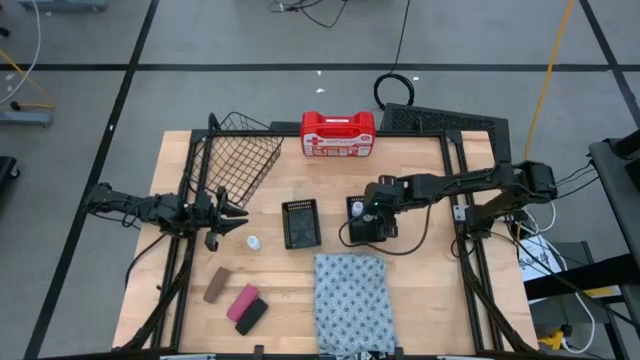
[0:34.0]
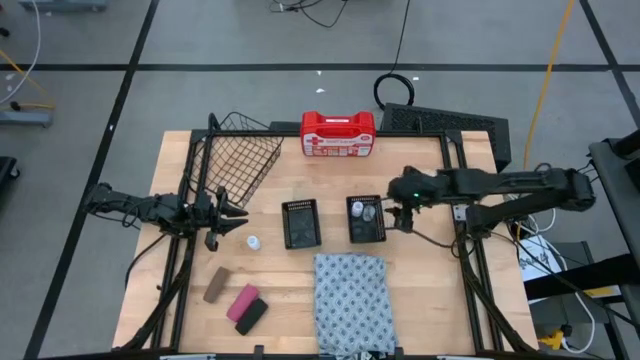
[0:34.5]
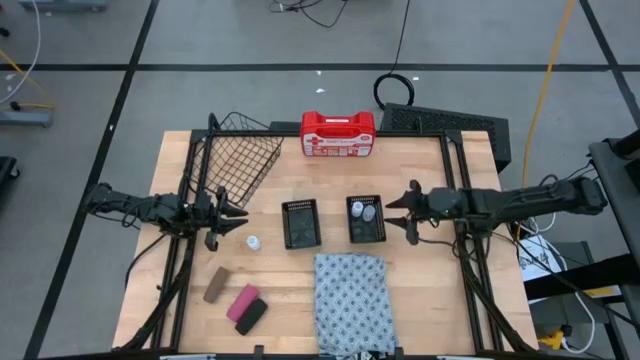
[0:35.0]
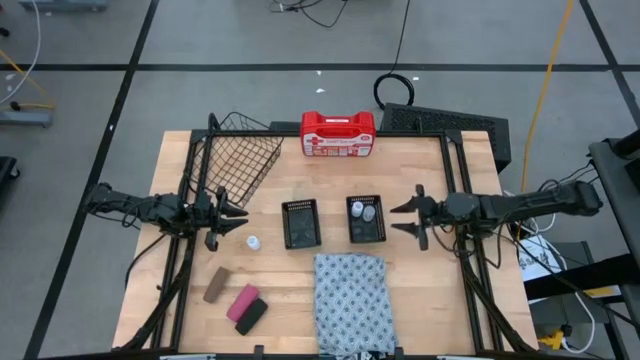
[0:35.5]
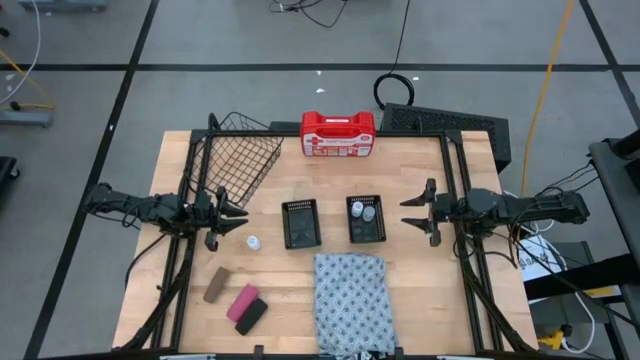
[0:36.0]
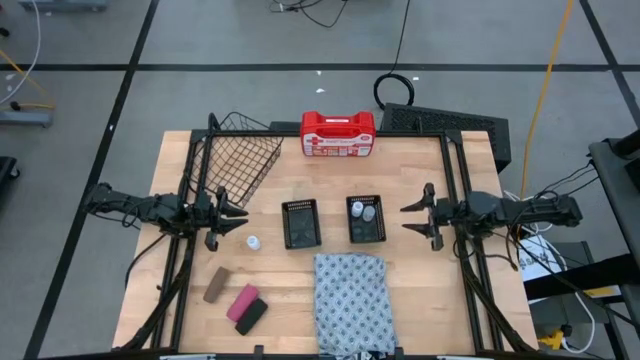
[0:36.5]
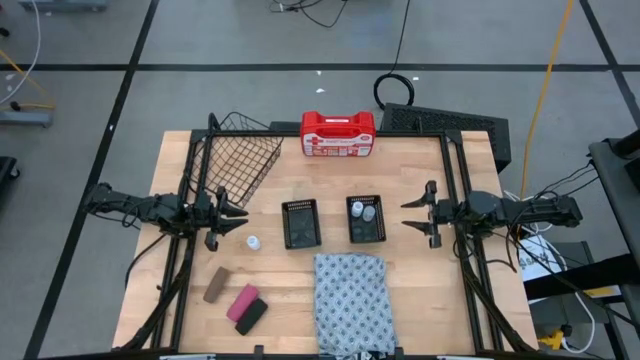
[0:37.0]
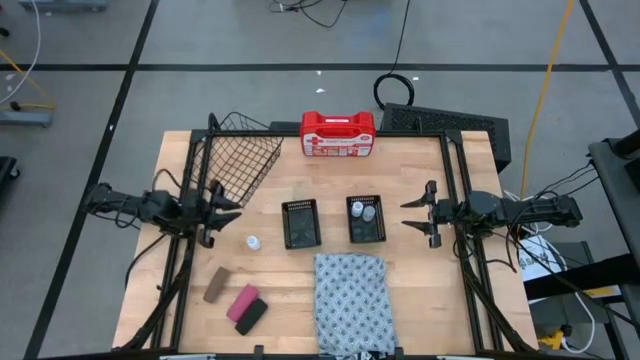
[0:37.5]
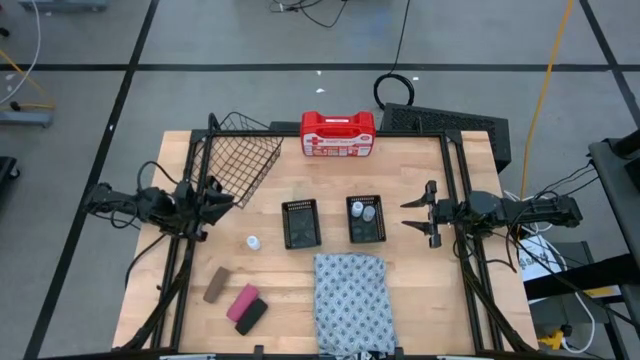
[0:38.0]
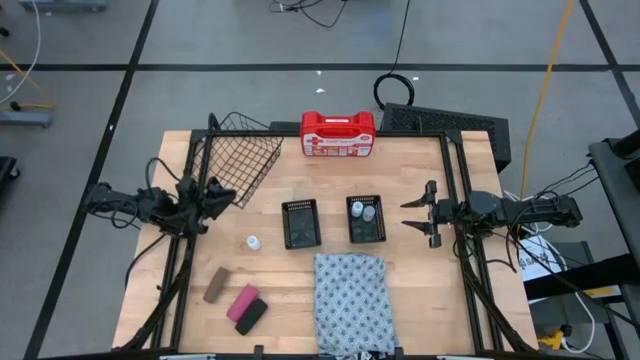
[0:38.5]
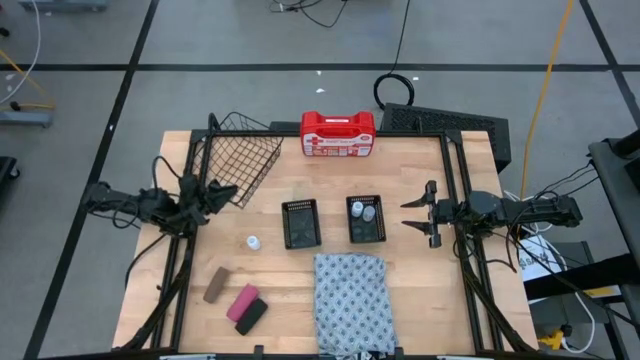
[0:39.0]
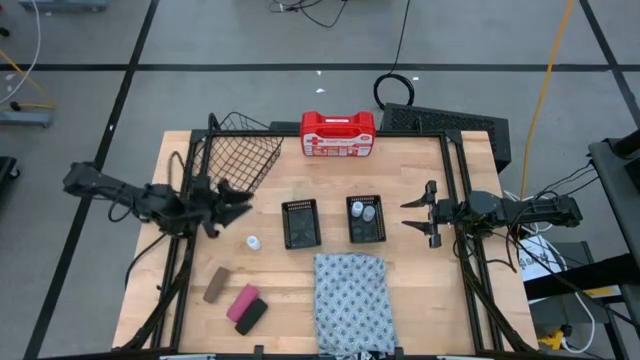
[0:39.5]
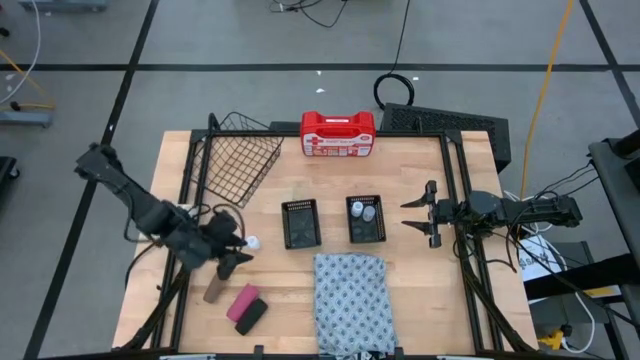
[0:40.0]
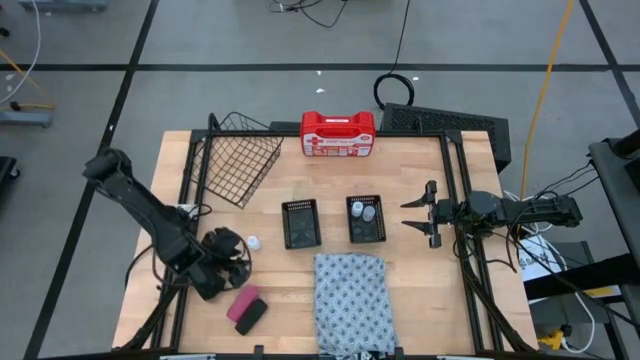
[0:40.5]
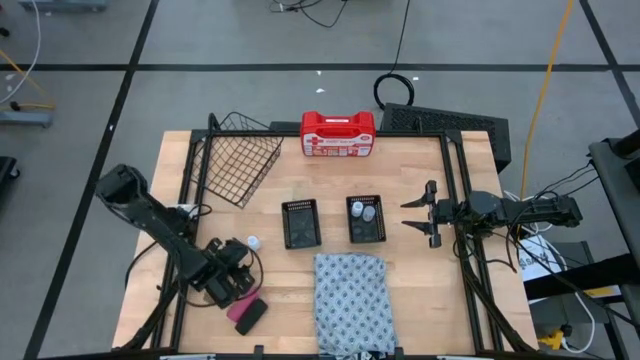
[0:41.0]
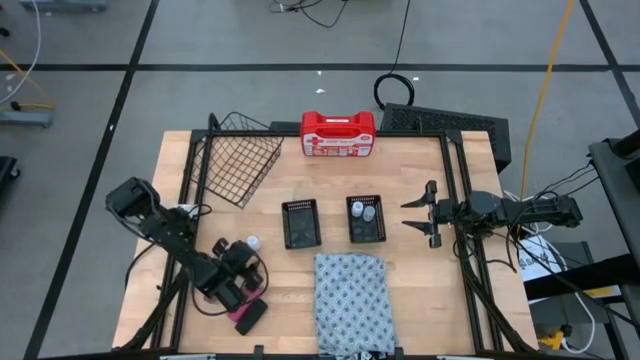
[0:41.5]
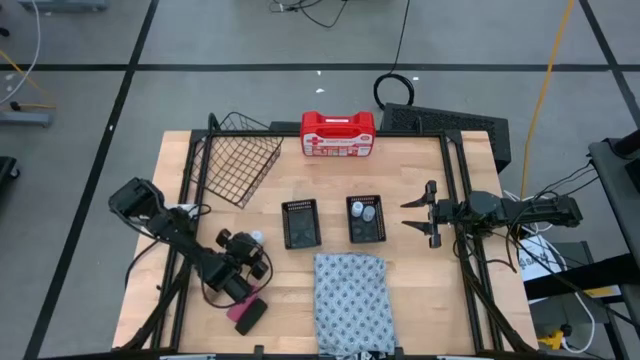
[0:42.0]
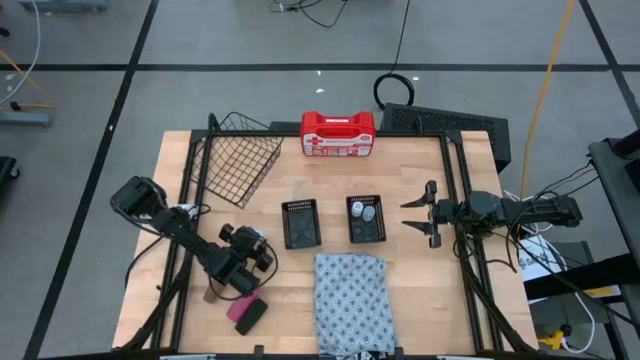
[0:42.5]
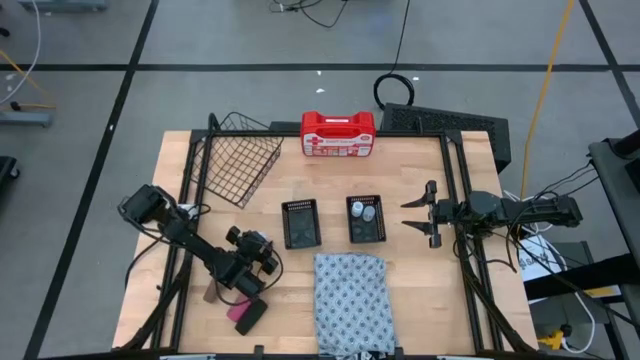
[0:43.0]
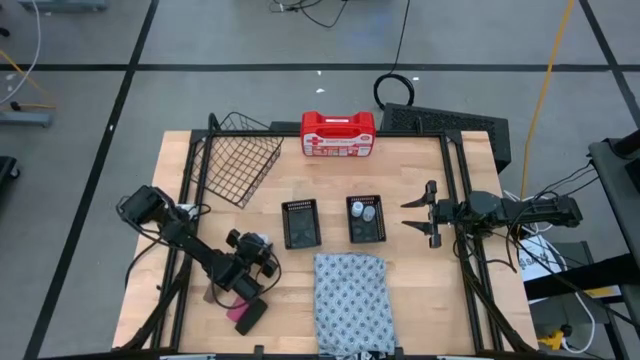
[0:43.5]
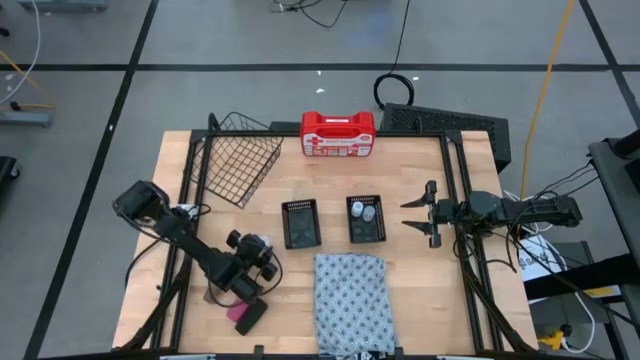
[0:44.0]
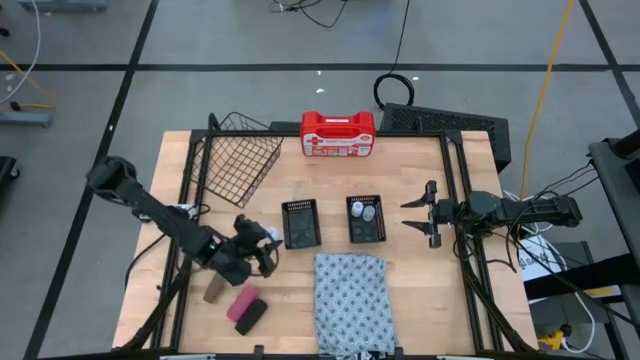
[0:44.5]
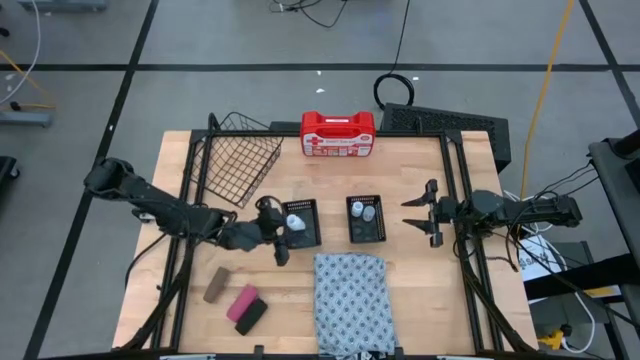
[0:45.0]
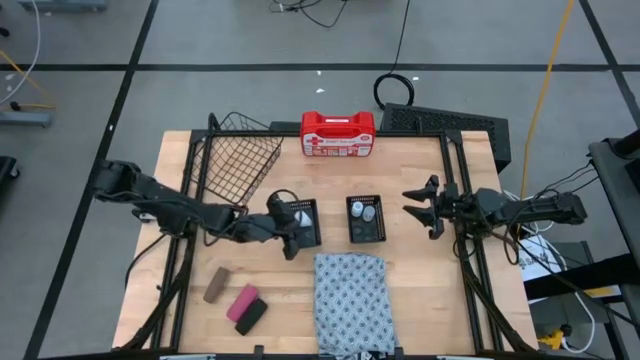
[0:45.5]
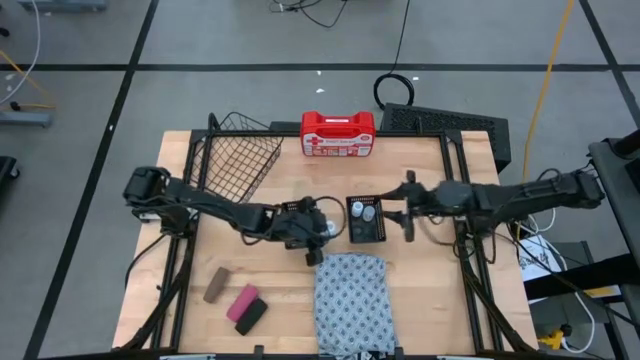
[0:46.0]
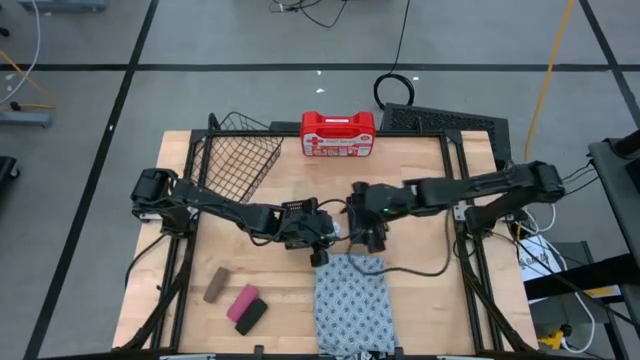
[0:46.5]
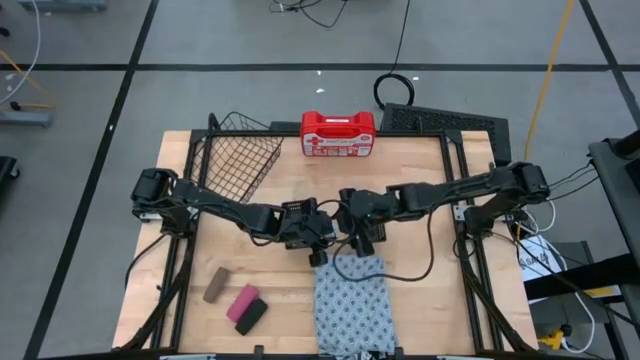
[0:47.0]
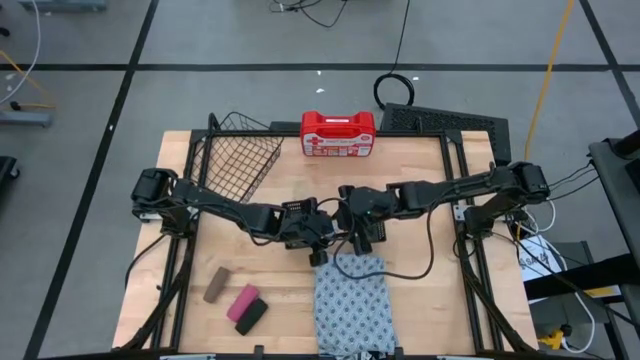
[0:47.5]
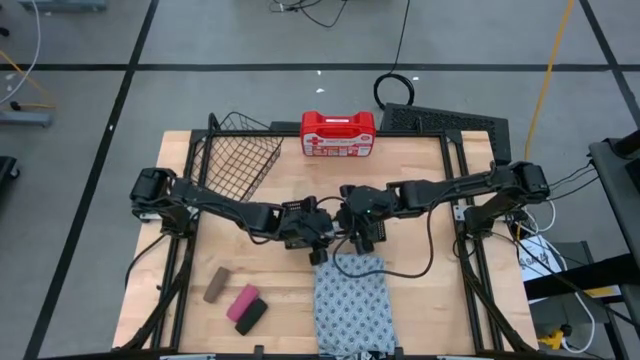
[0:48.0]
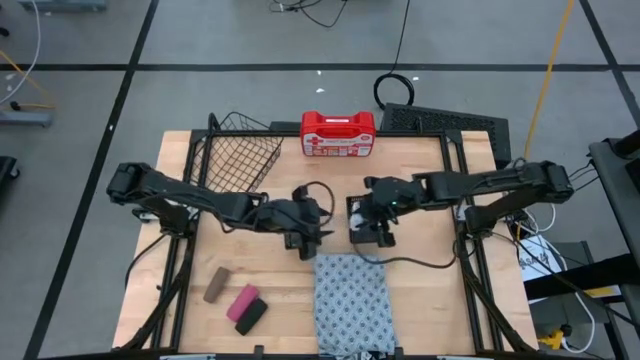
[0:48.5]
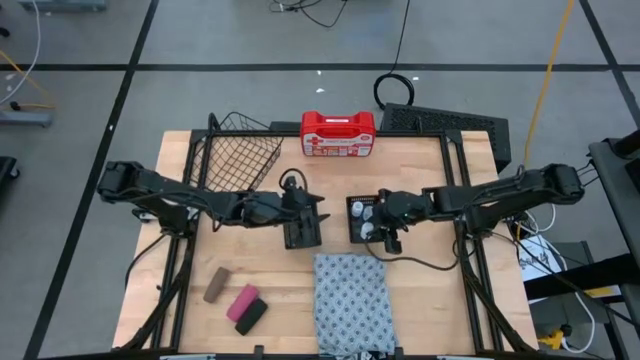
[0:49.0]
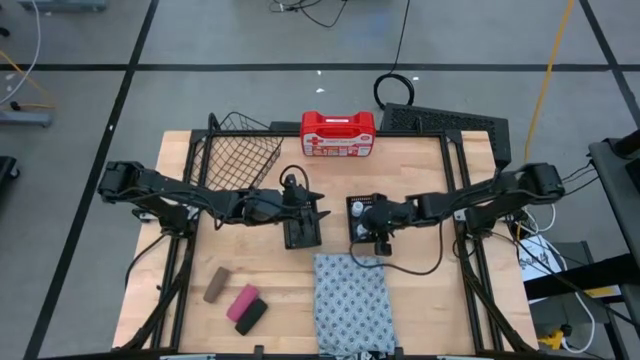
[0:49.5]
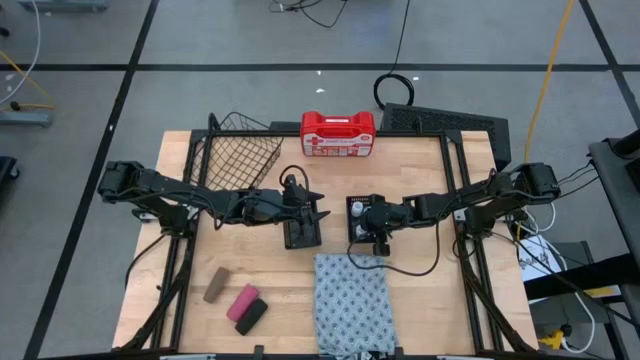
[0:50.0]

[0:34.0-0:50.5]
Task: Pick & Place Medicine items
Put the white pill bottle into the right black basket

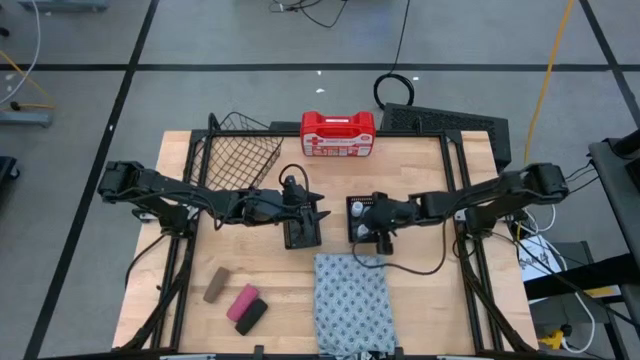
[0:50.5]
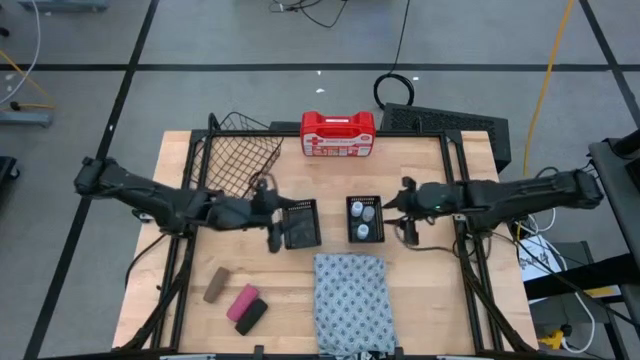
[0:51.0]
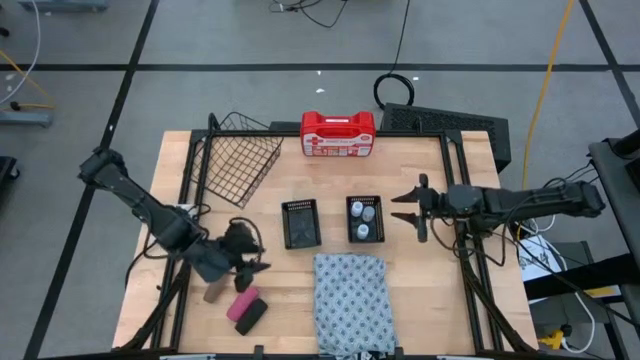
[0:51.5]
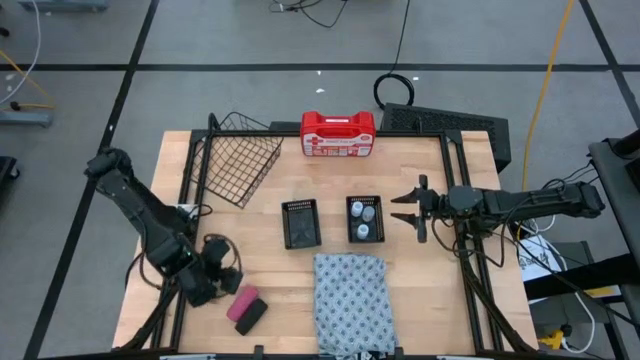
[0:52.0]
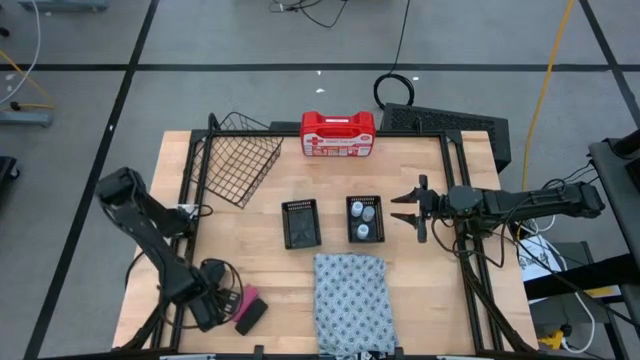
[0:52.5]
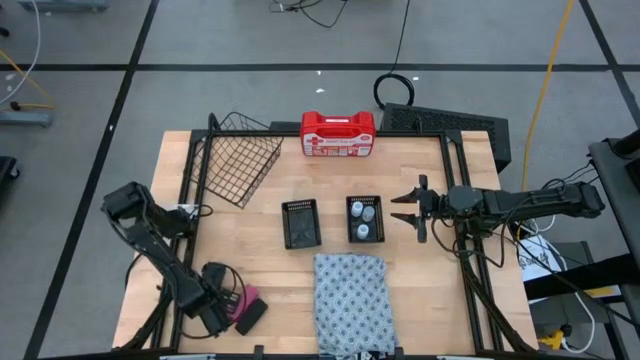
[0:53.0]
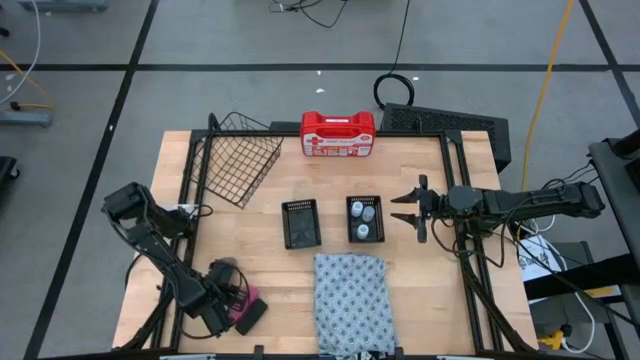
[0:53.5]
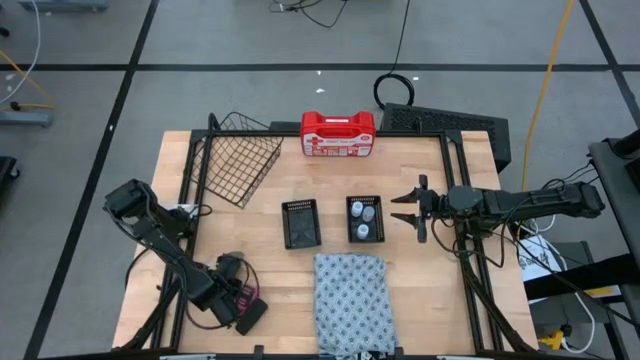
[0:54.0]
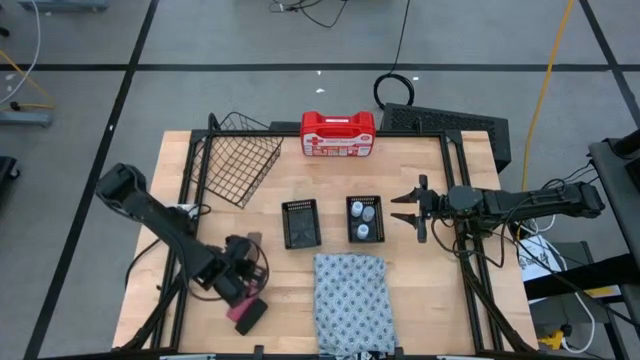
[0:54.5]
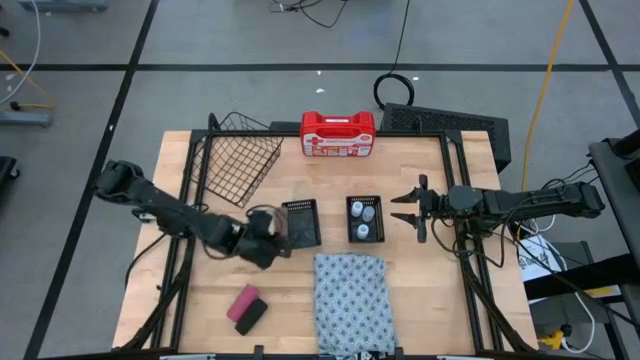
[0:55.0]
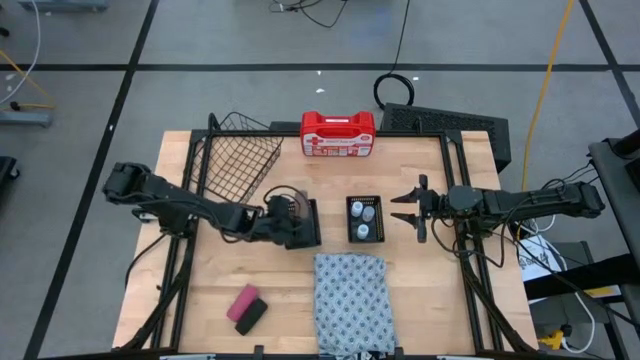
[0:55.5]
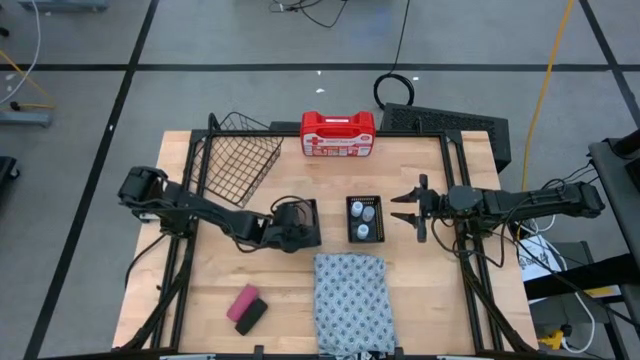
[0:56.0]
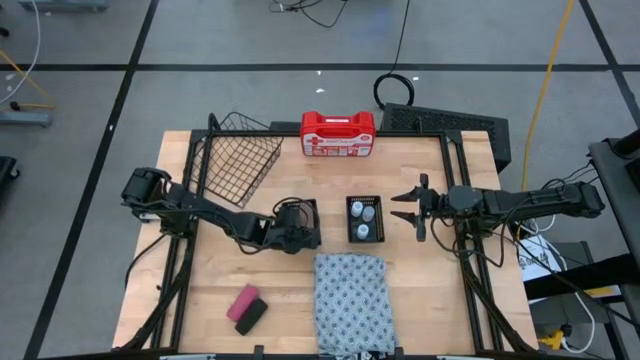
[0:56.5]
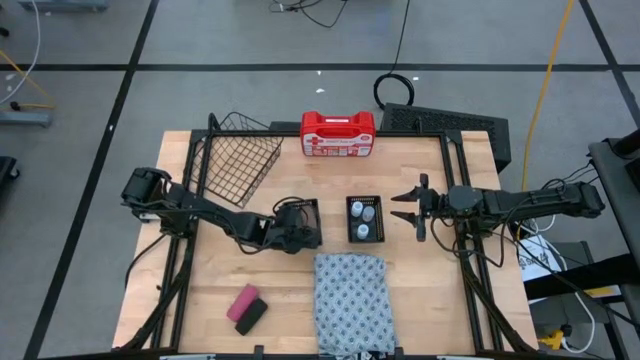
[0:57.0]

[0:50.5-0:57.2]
Put the brown bandage into the left black basket
